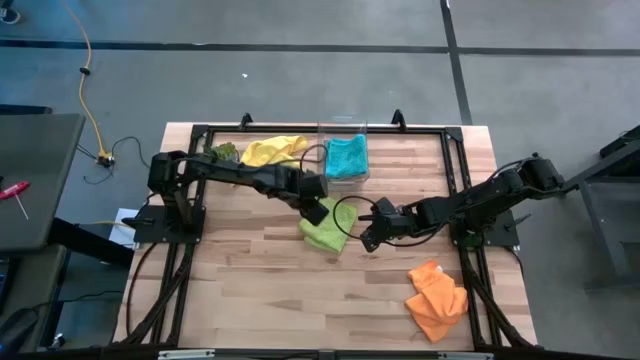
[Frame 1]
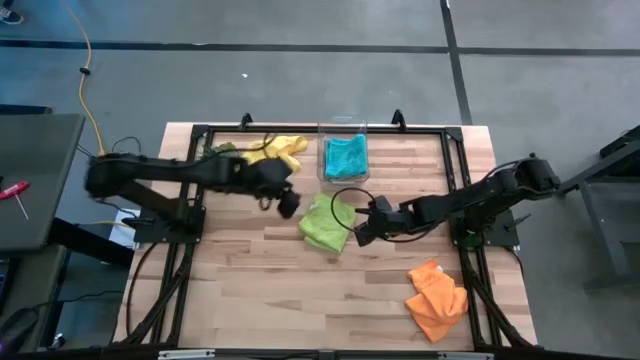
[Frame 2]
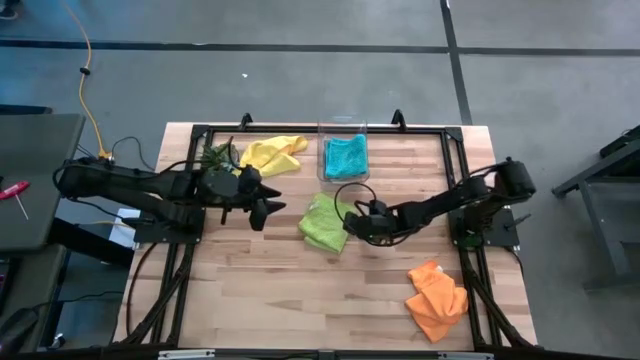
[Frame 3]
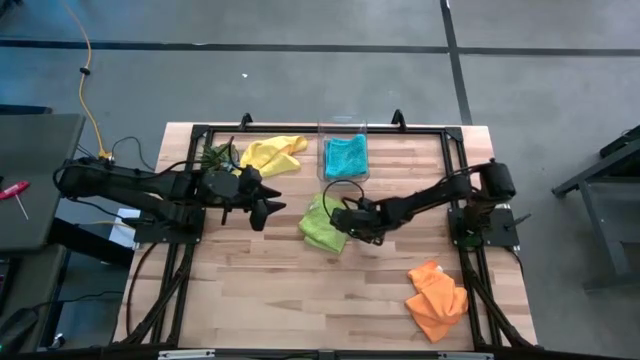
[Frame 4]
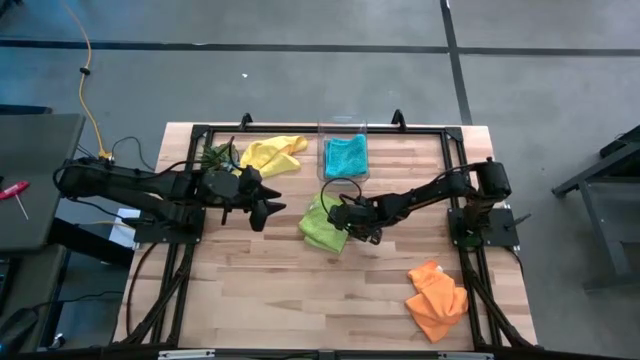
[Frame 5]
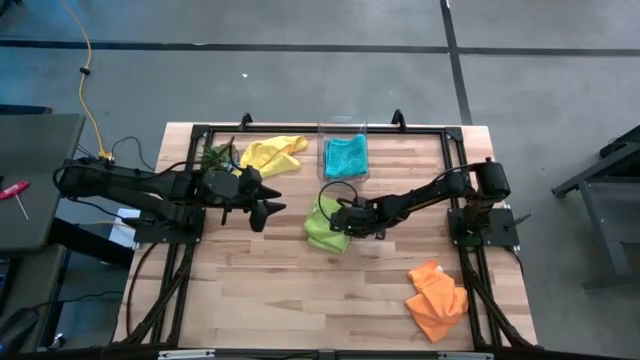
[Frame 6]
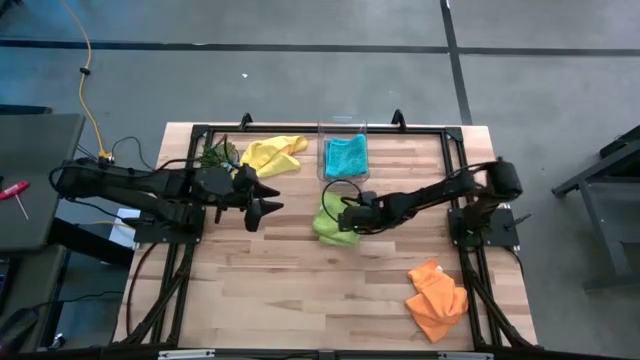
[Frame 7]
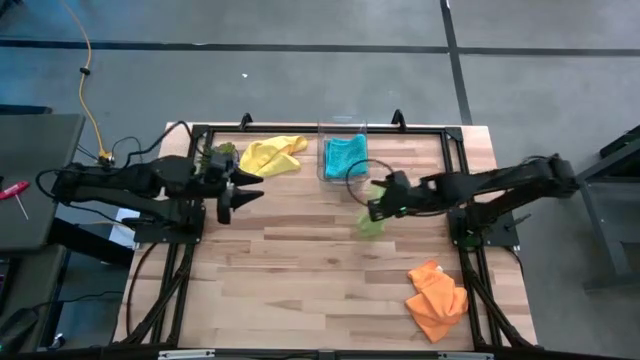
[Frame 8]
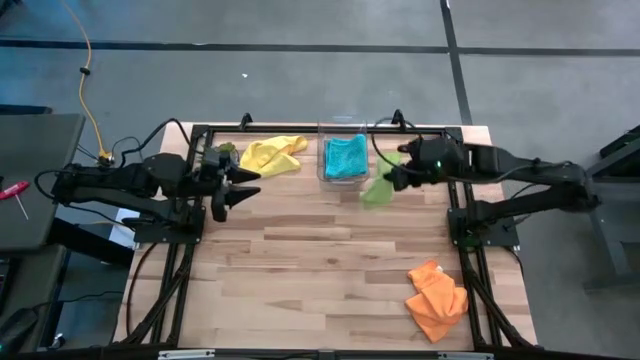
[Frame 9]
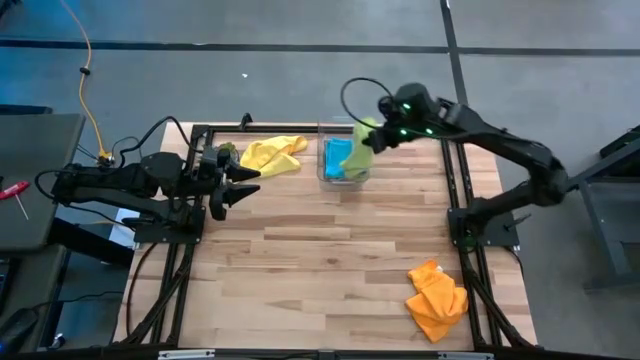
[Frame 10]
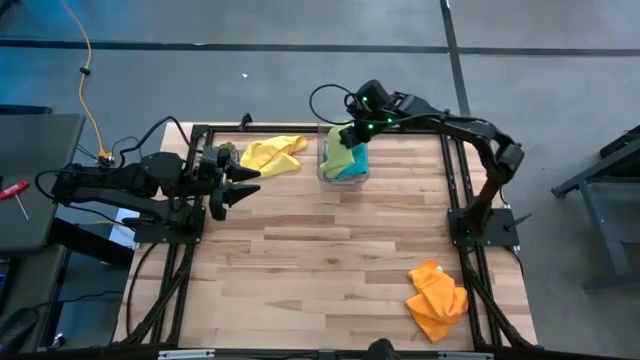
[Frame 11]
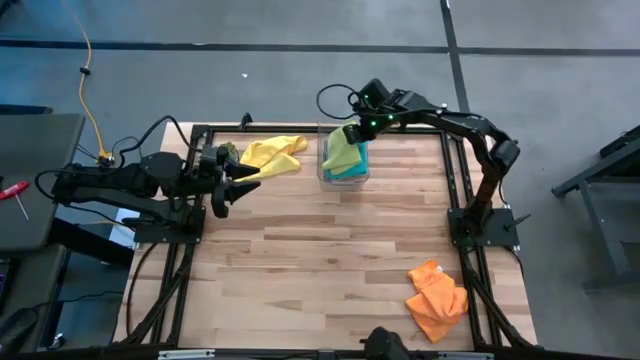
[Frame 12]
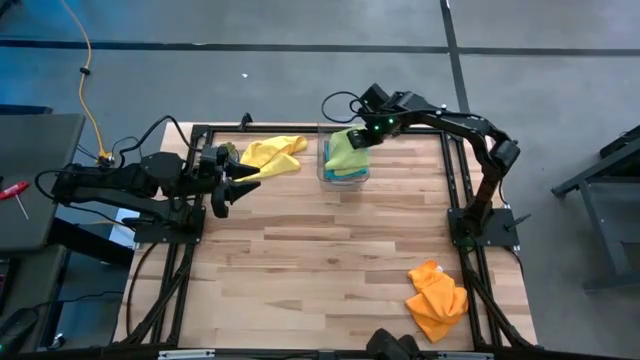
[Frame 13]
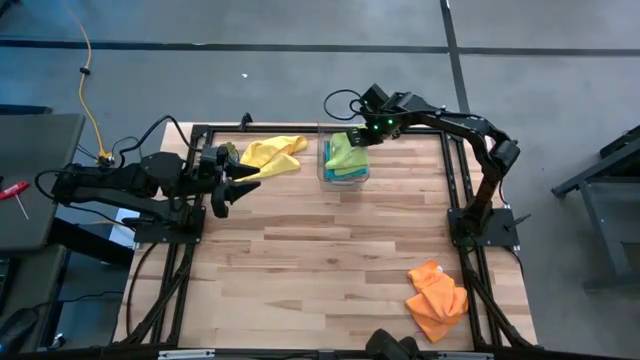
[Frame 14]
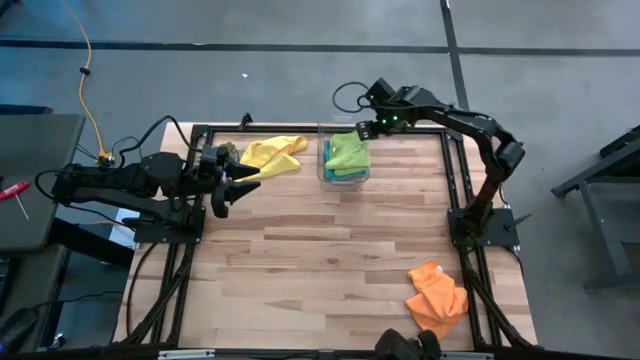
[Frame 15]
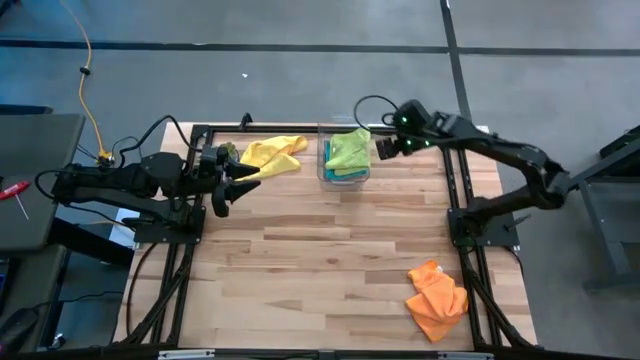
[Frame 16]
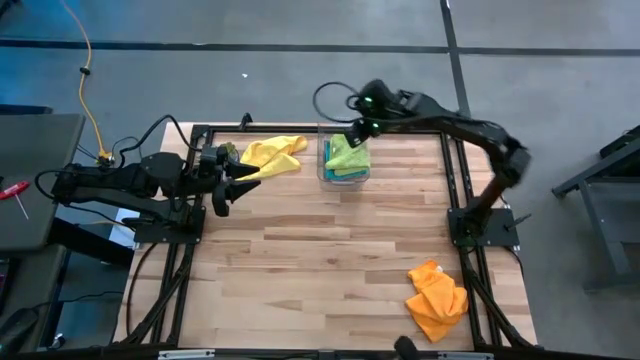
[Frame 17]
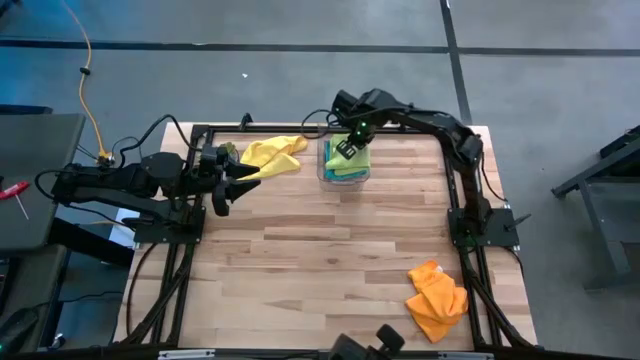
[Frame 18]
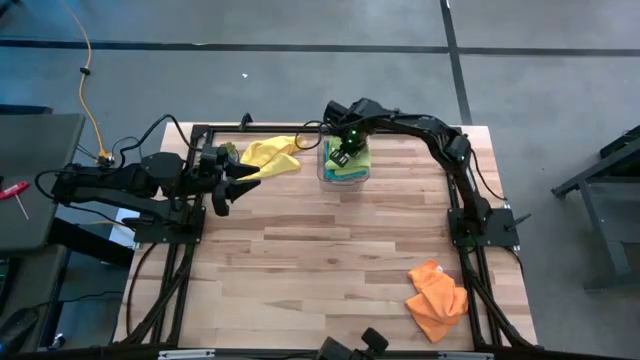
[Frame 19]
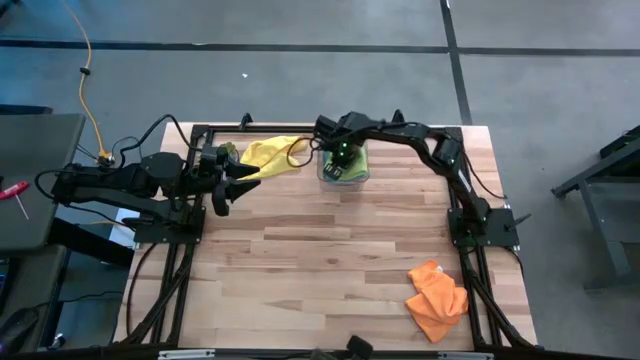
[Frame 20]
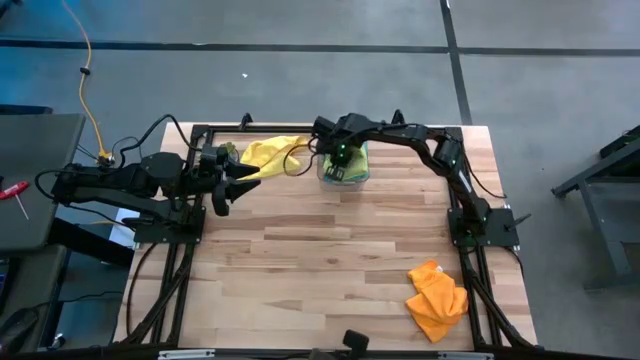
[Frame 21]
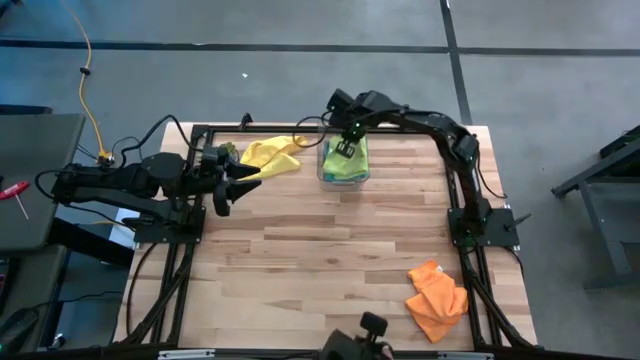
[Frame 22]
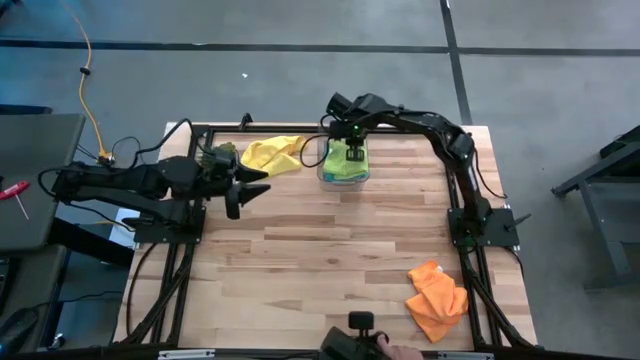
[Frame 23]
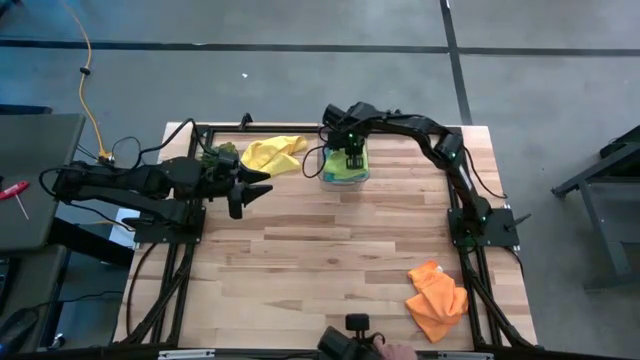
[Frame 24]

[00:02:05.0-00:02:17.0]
Task: Fold microfiber towels
Put the green microfiber cloth into the transparent bin

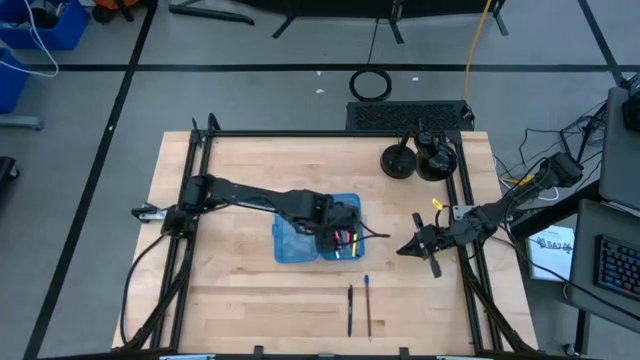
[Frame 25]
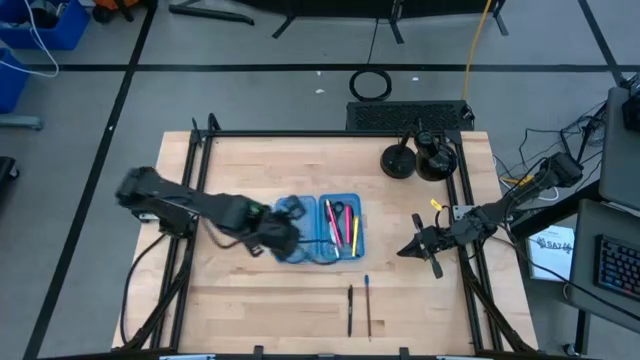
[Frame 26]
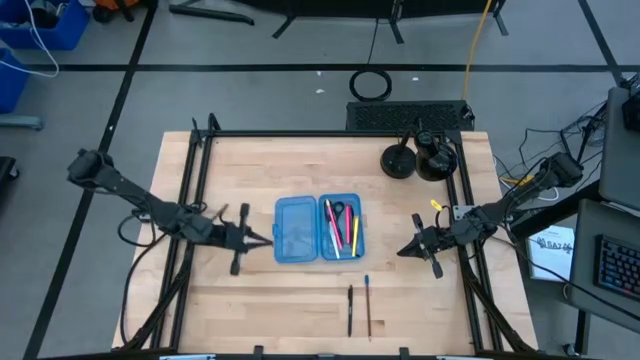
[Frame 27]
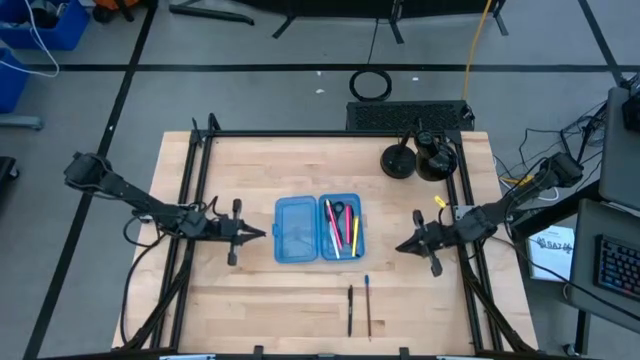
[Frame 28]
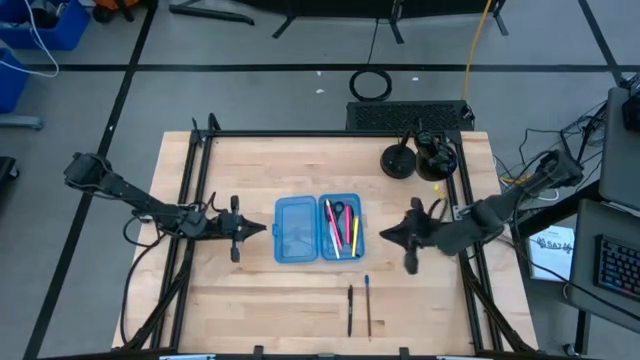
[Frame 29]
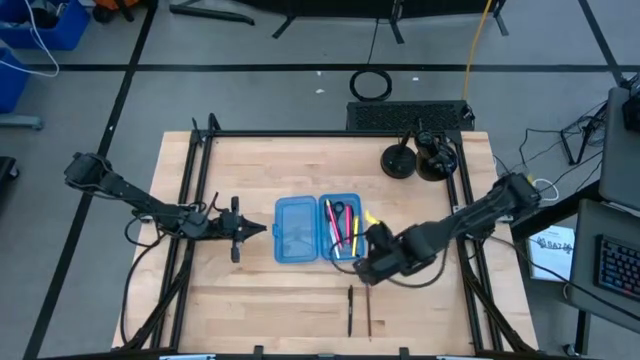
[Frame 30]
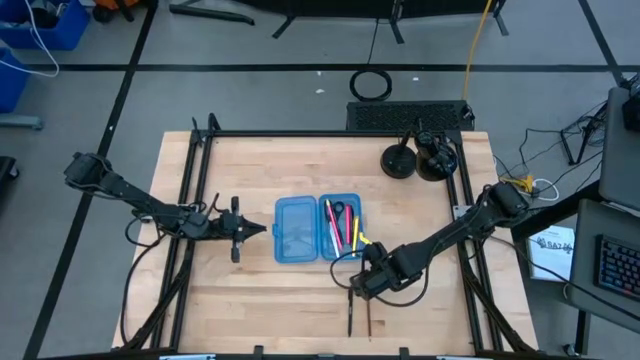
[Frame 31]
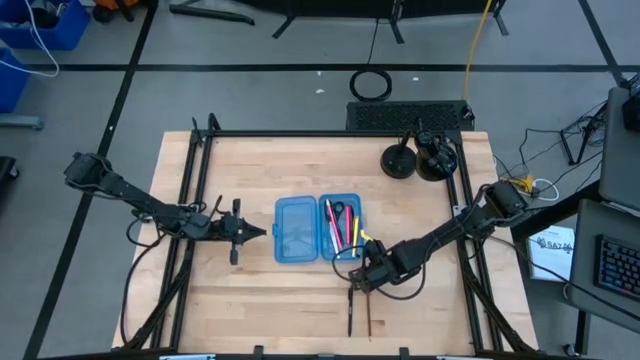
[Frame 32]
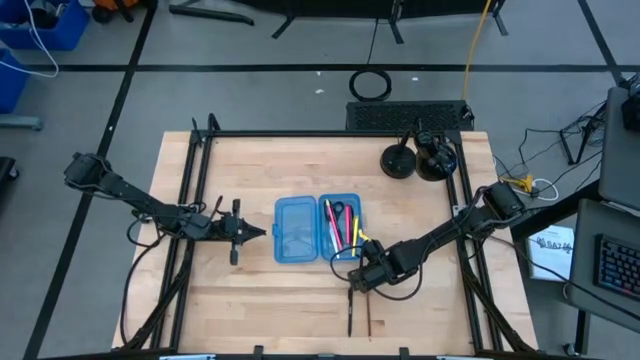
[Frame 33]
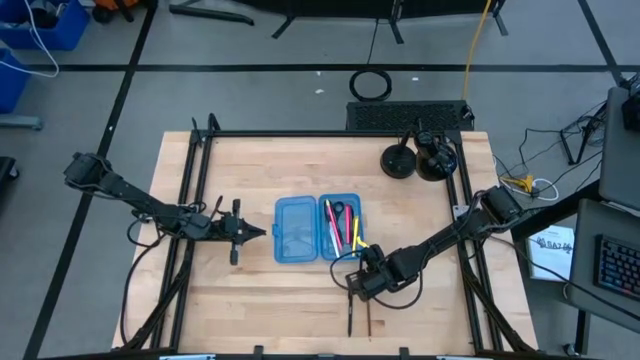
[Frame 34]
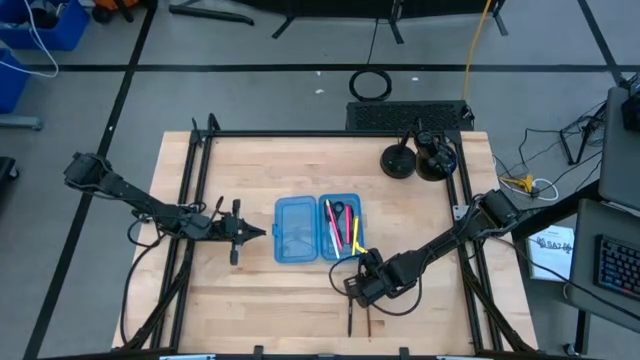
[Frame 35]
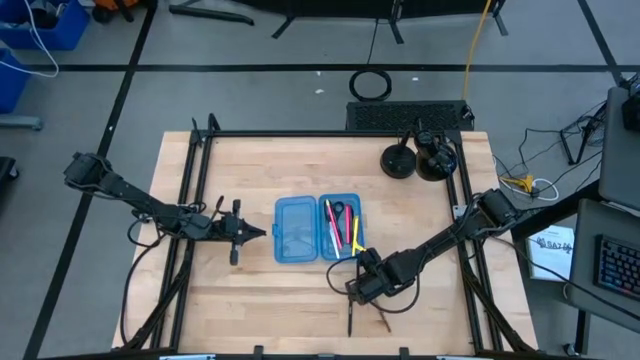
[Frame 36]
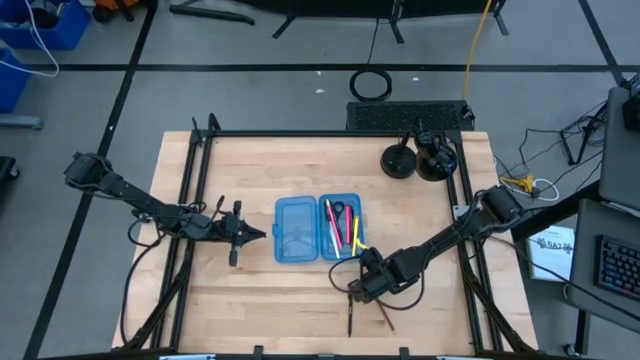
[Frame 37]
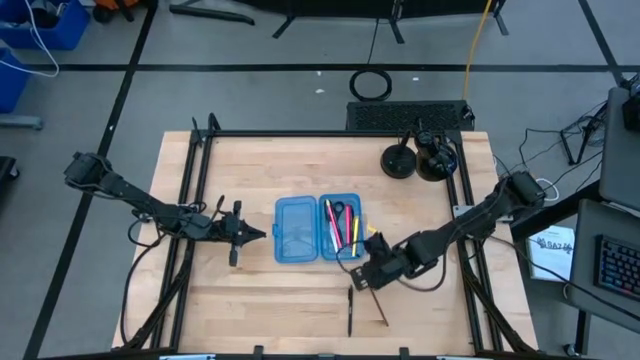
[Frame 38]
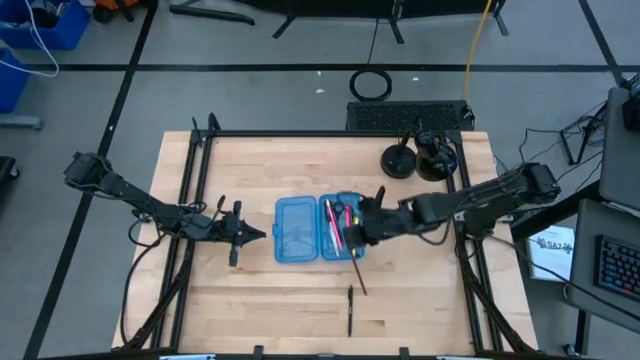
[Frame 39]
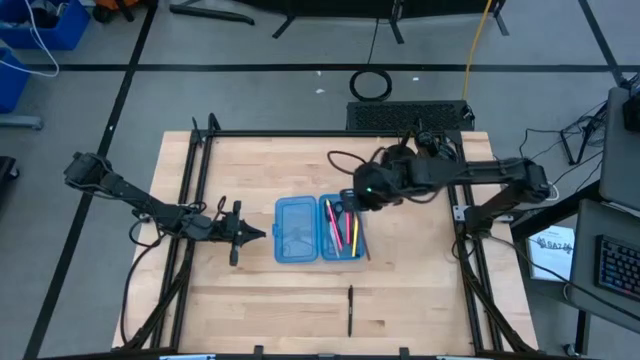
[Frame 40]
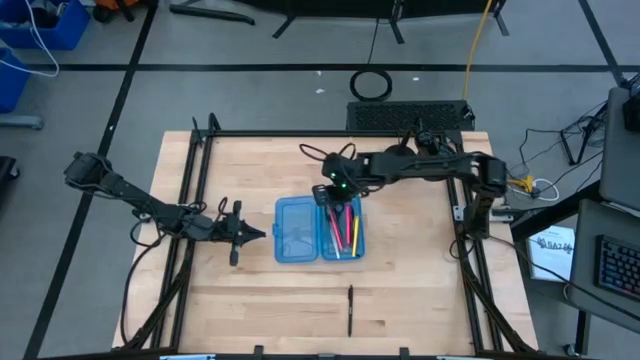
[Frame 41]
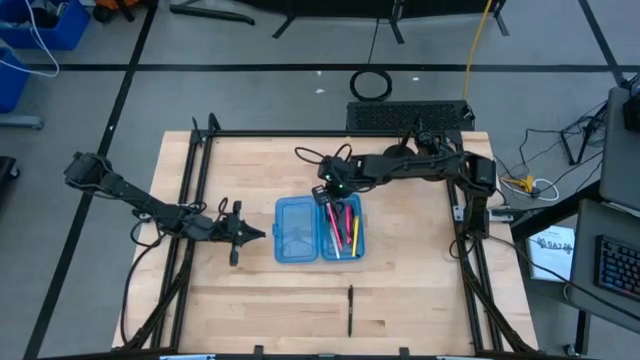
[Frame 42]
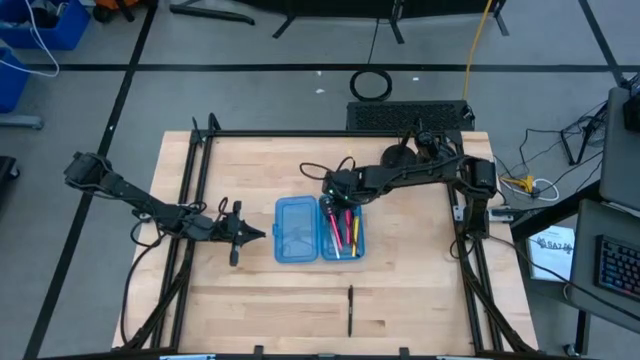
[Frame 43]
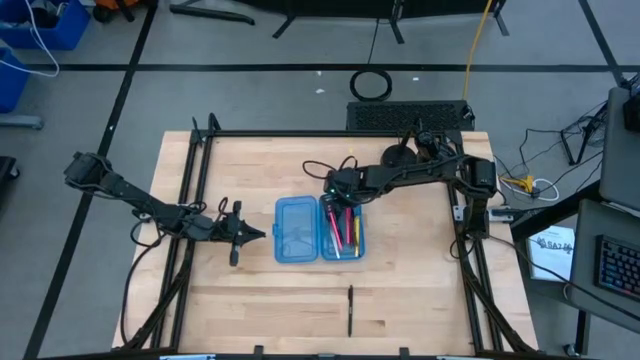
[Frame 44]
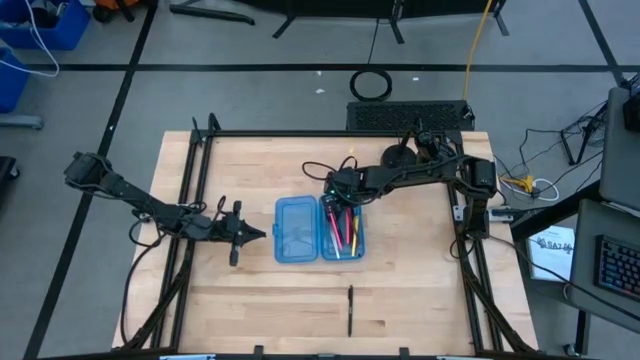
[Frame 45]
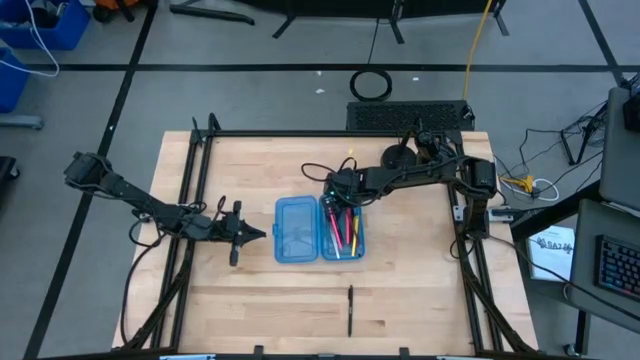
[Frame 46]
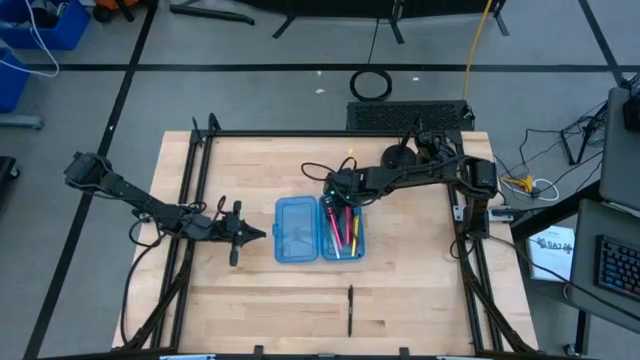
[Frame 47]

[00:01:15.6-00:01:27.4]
Task: Pick & place school supplies into a supply box
Put the brown pencil into the blue supply box
